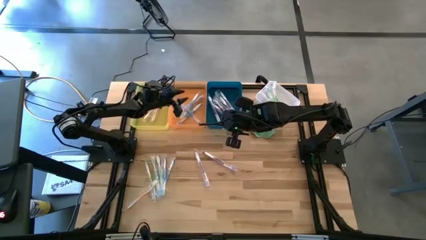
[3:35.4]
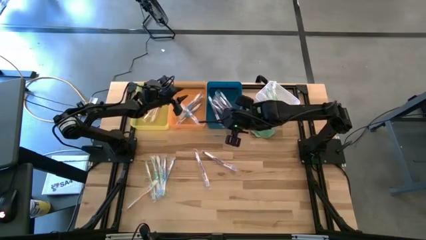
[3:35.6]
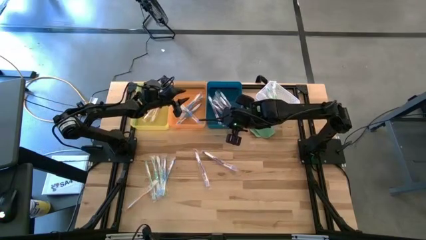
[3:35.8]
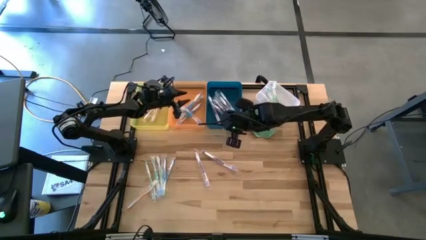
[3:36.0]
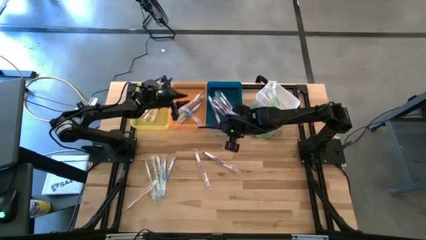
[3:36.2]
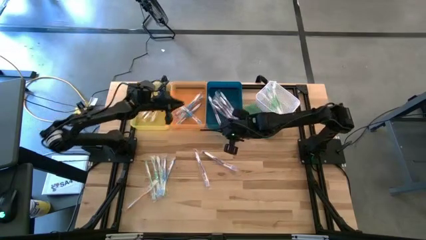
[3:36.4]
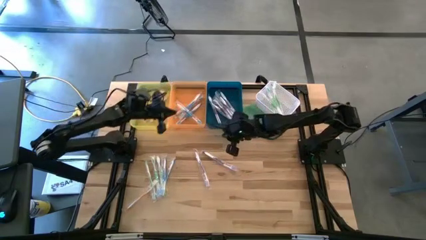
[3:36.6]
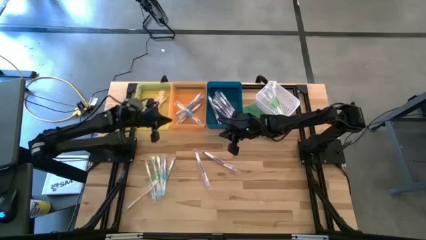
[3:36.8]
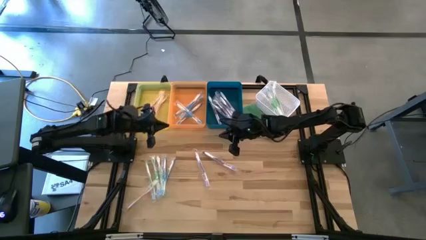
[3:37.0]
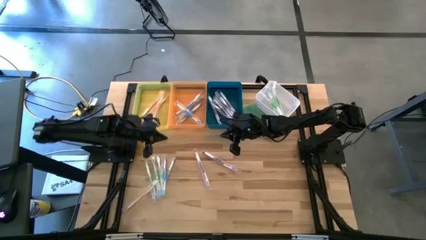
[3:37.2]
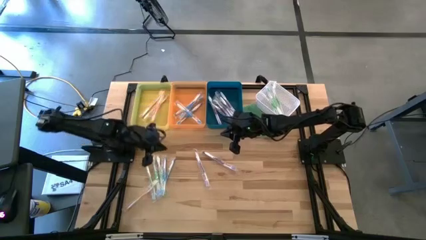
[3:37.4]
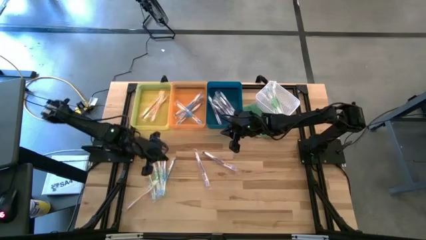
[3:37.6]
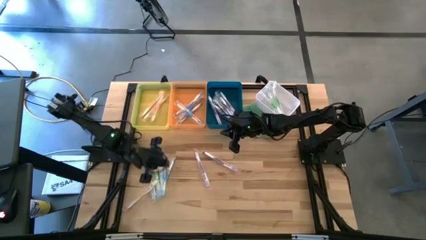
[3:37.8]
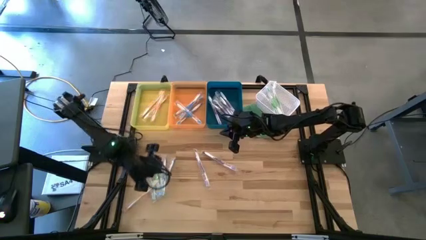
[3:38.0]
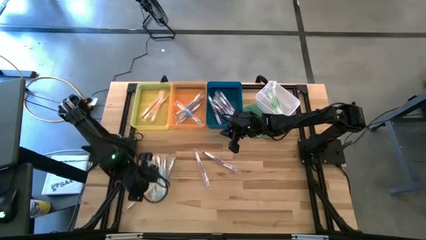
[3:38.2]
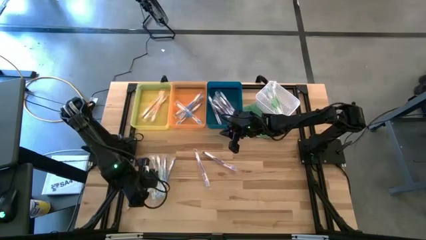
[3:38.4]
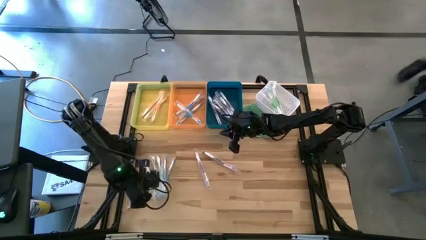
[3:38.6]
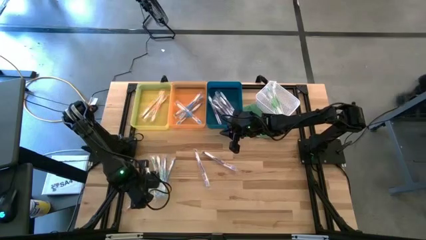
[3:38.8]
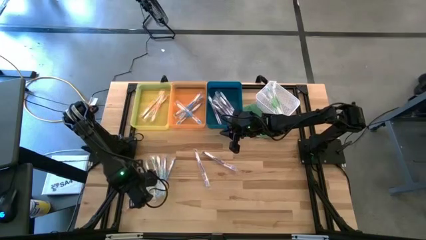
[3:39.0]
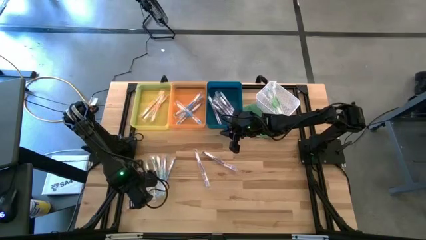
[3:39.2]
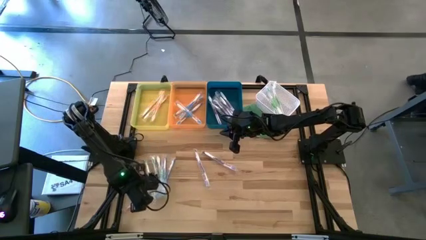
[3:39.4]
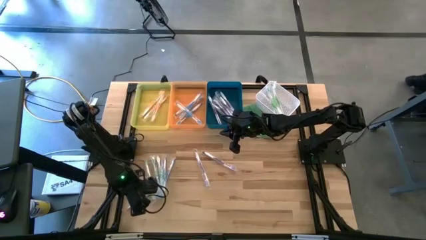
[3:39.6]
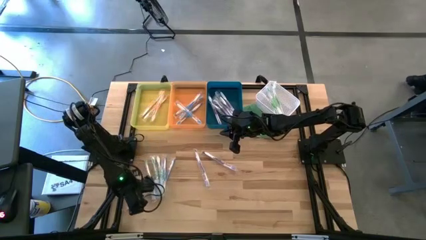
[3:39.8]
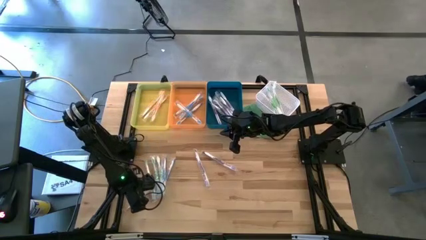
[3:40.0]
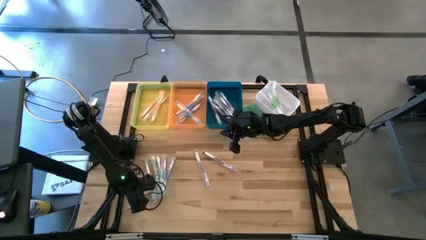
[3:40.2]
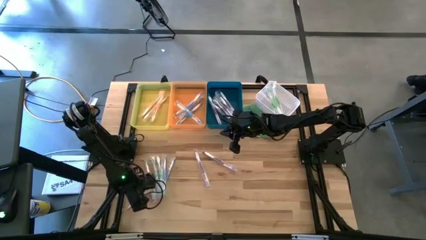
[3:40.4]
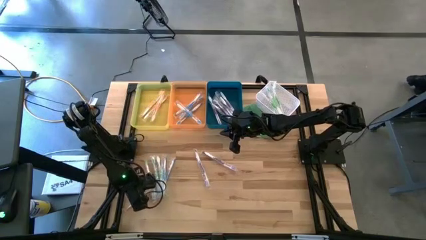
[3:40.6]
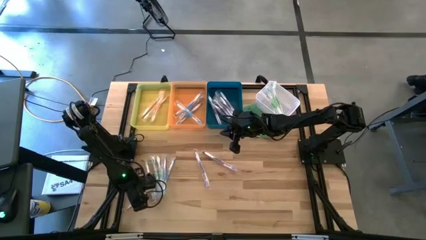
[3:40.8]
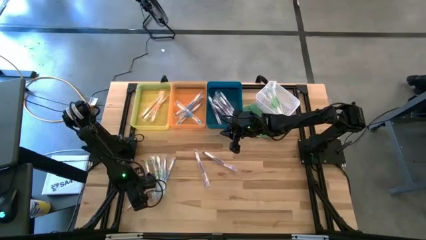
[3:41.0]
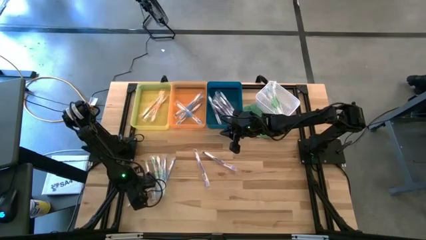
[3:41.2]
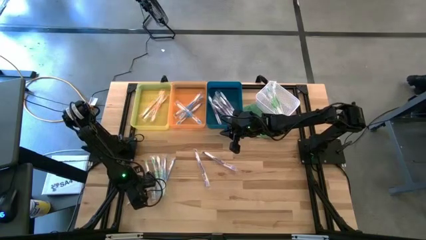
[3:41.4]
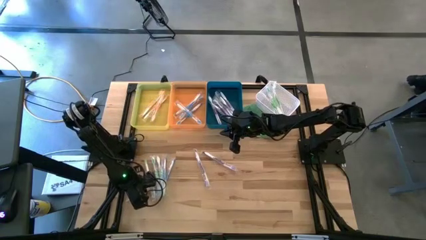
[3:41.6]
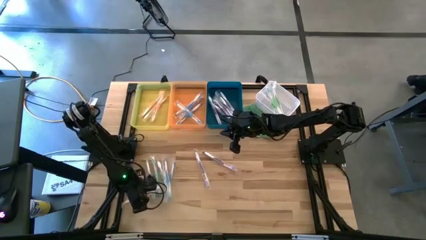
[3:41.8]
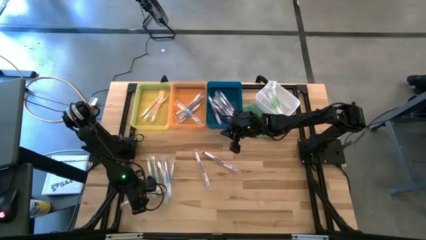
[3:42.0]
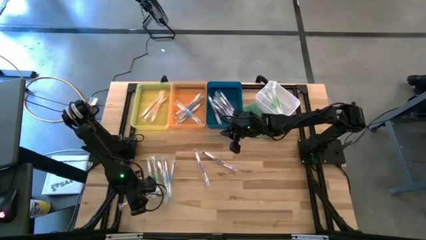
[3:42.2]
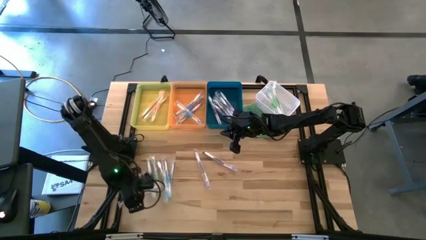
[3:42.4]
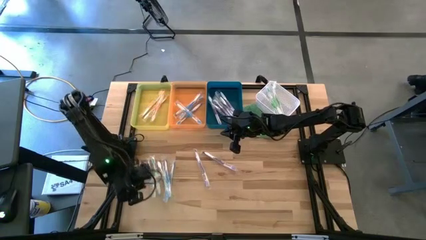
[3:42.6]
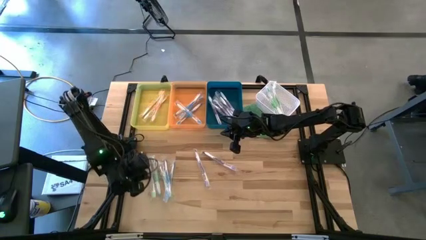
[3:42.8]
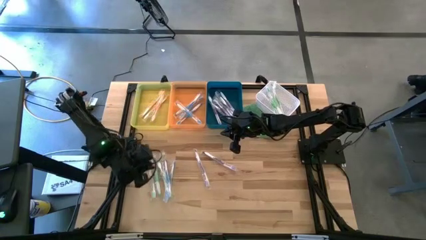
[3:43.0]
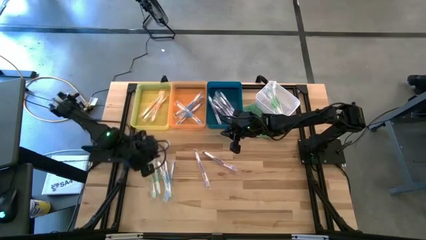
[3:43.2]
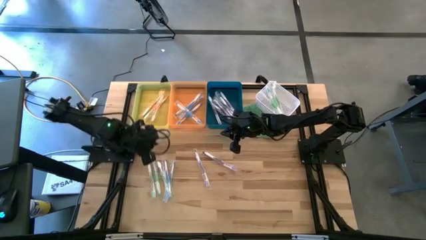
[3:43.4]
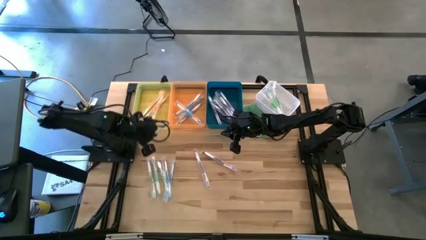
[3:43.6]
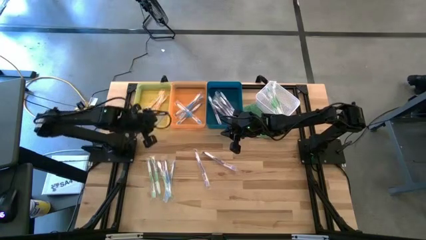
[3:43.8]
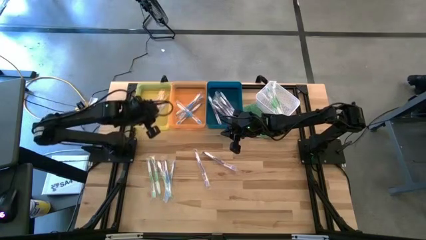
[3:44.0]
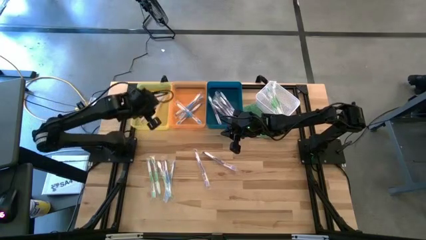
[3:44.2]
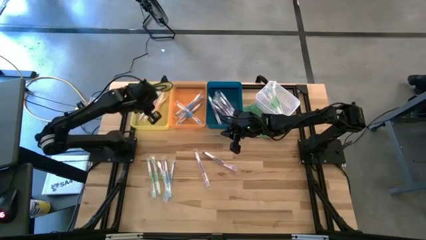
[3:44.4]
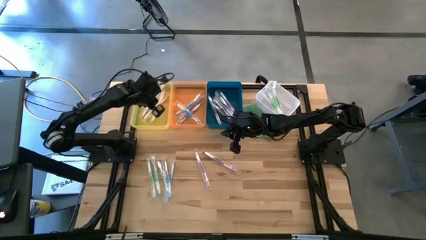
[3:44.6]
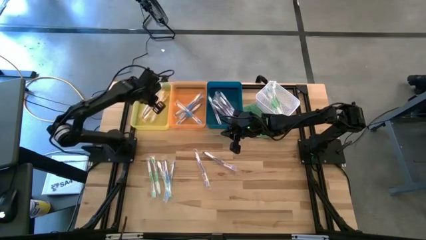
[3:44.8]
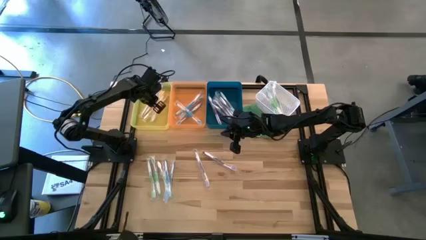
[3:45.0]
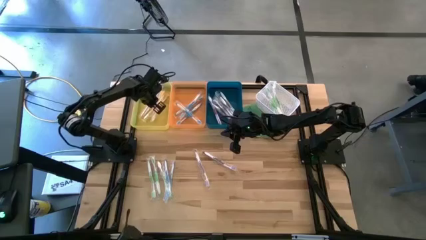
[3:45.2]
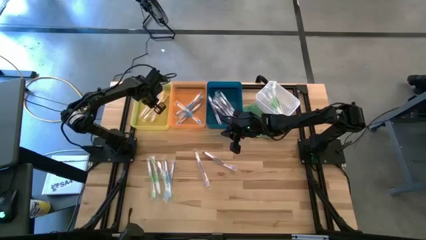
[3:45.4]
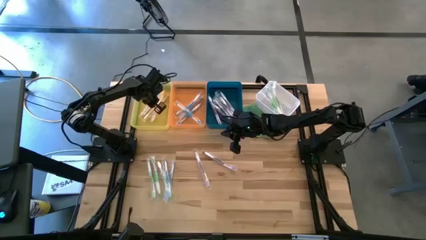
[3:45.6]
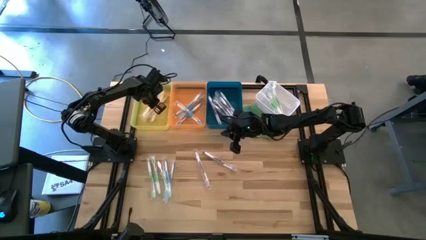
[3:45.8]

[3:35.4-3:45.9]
Task: Pick & Place Toothbrushes
Put the yellow toothbrush into the yellow bin

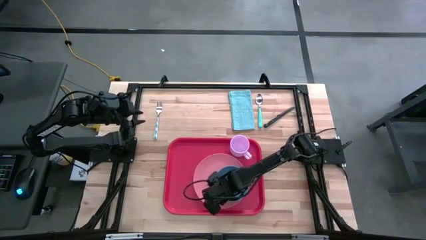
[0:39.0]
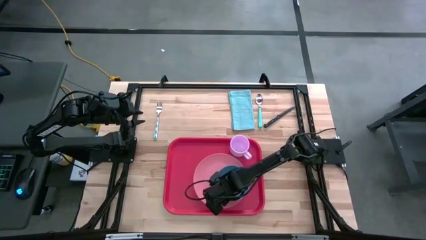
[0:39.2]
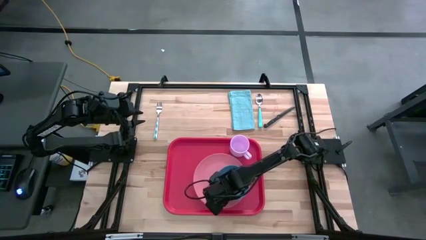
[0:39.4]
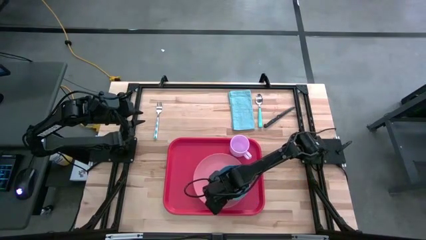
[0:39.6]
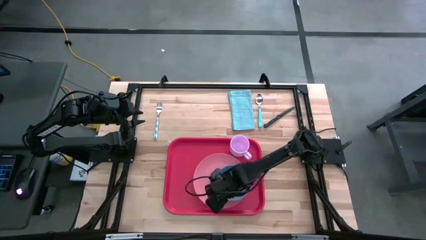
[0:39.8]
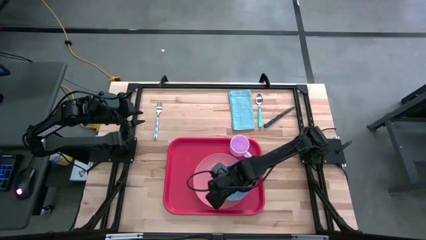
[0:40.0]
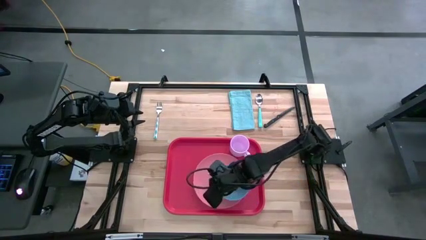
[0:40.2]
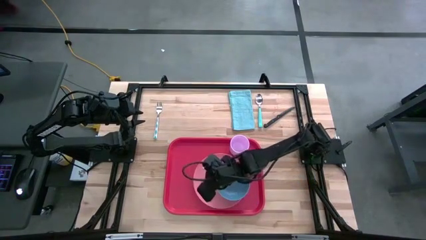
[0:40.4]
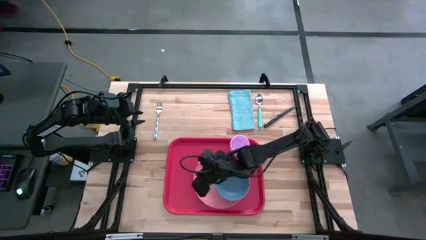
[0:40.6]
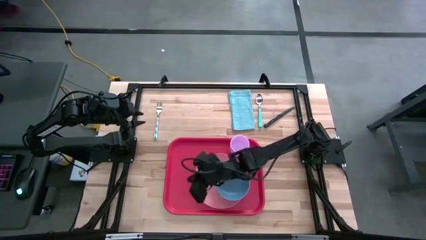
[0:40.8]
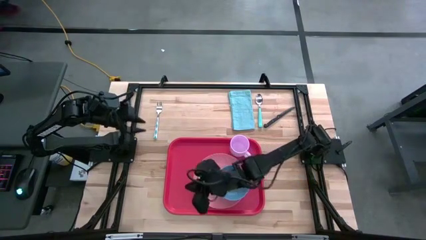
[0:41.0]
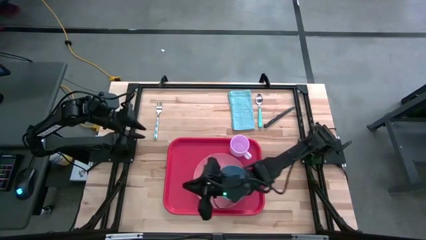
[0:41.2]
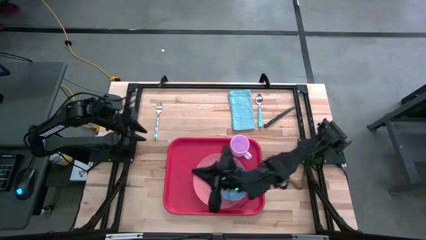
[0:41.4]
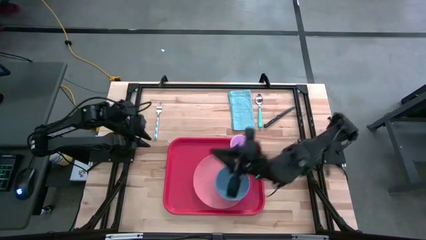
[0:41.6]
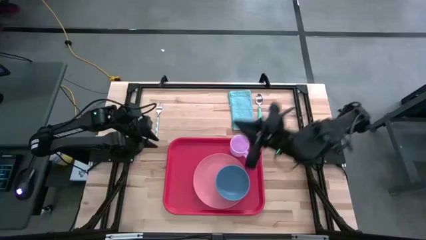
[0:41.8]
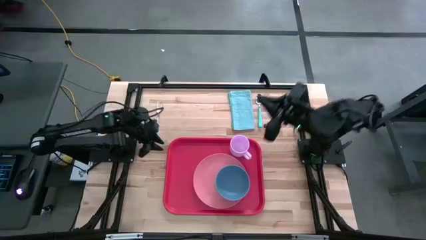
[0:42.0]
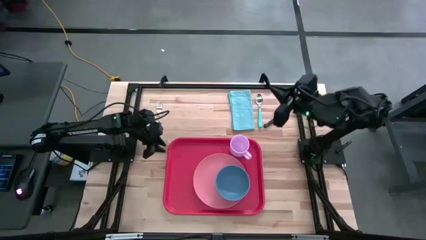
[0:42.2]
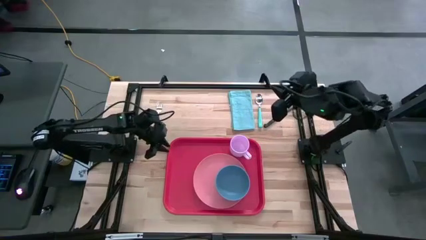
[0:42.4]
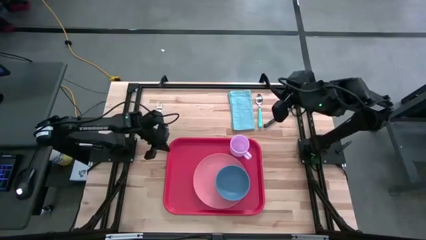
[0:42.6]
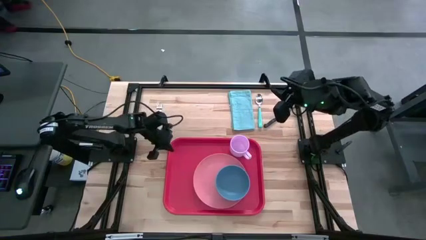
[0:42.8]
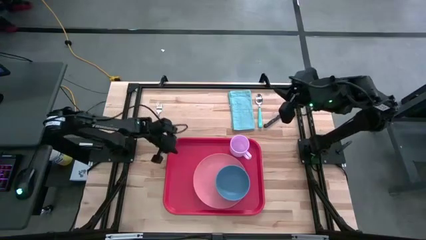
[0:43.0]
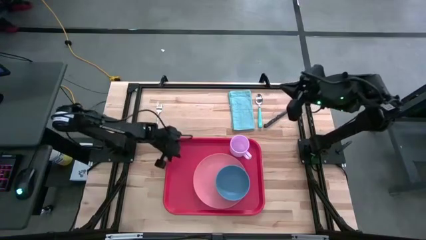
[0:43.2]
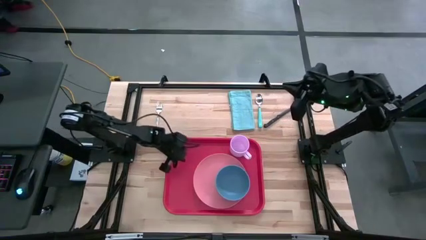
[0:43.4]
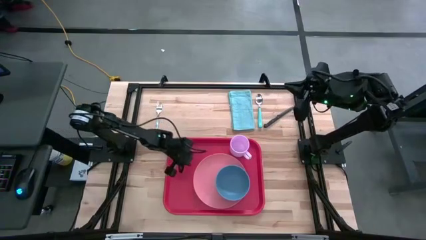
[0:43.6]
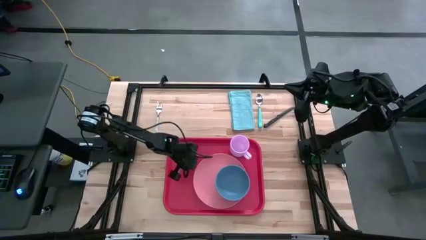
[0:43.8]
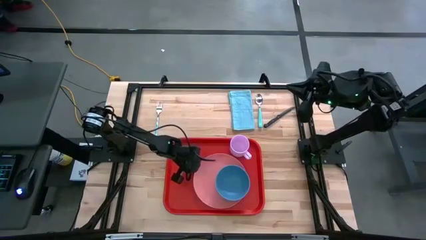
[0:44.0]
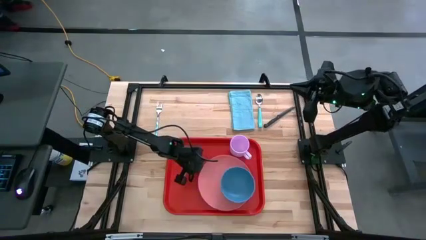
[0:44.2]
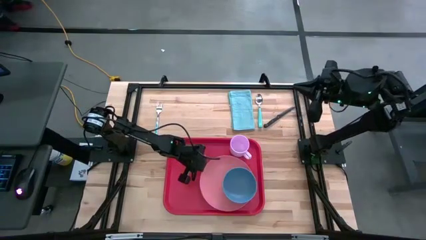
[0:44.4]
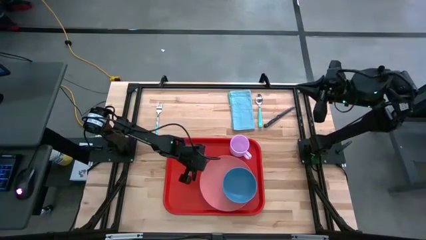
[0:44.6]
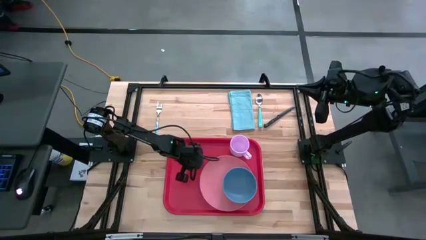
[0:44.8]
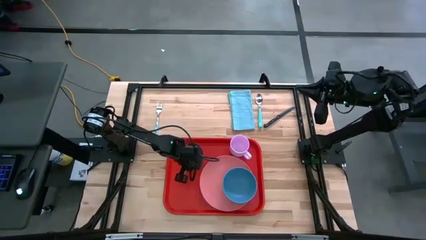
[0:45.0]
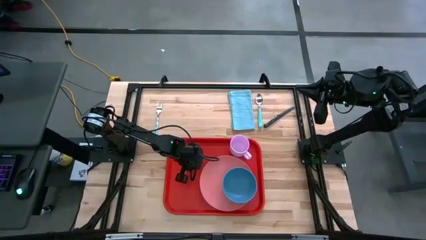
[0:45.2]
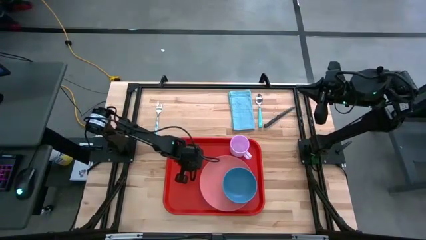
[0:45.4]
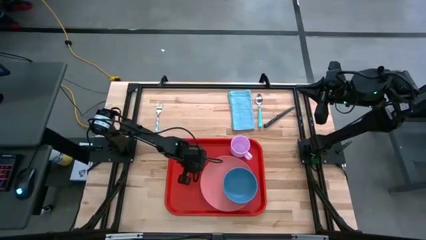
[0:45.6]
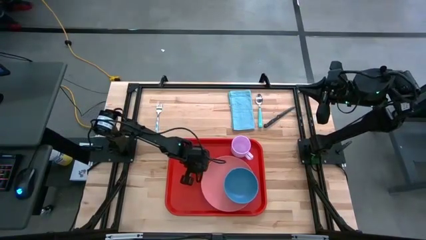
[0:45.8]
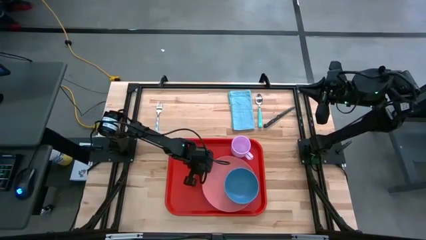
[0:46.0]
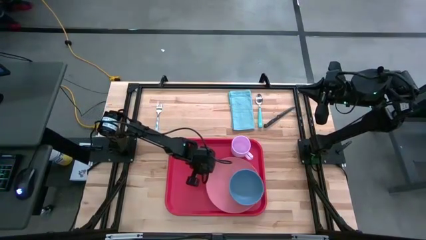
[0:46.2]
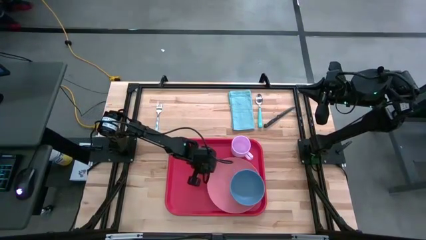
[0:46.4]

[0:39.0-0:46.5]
Task: Set up tray
Adjust the pink plate on the red serving tray
